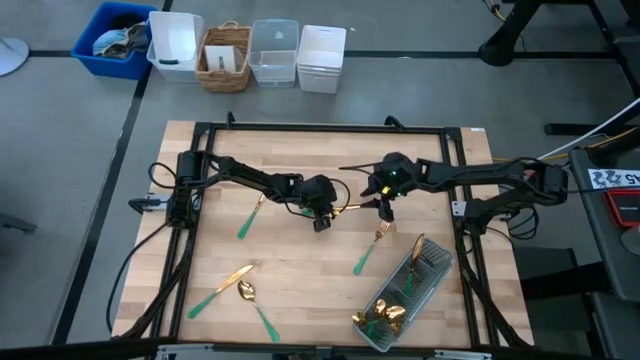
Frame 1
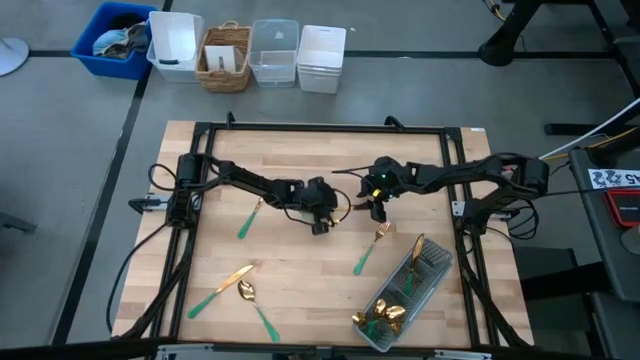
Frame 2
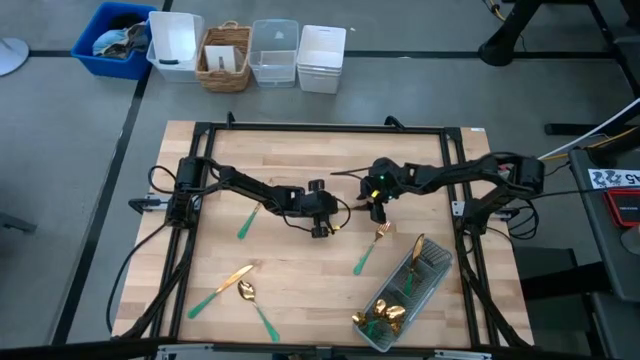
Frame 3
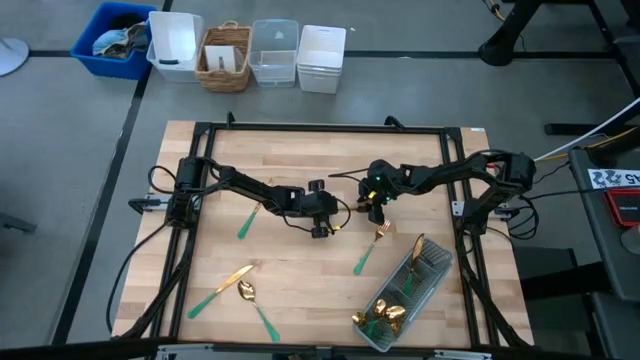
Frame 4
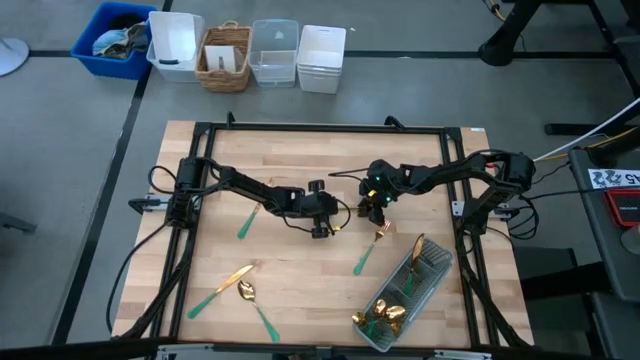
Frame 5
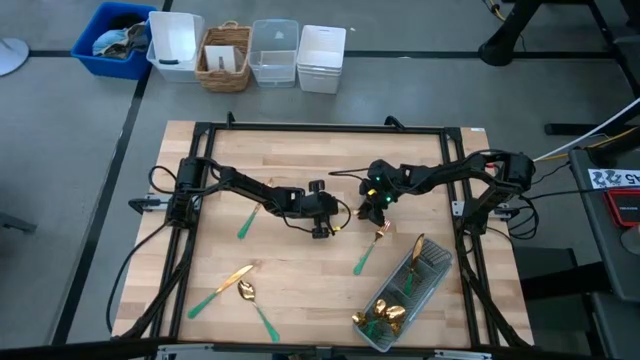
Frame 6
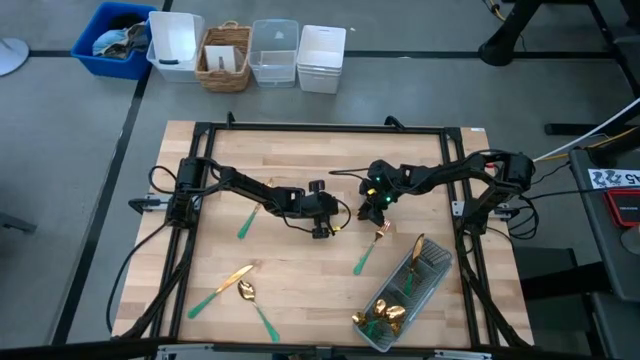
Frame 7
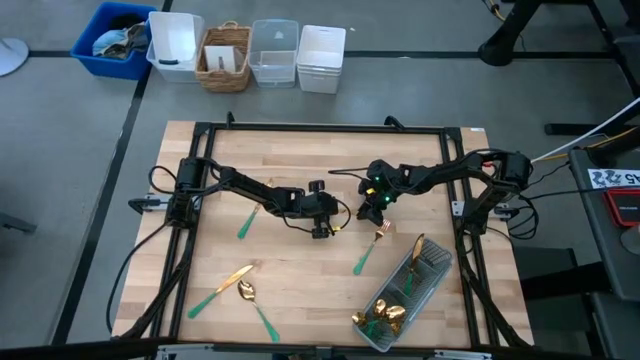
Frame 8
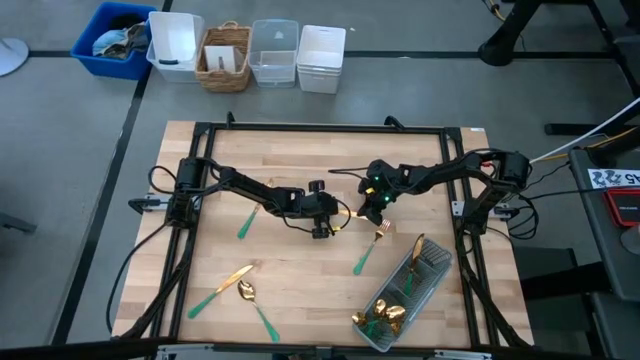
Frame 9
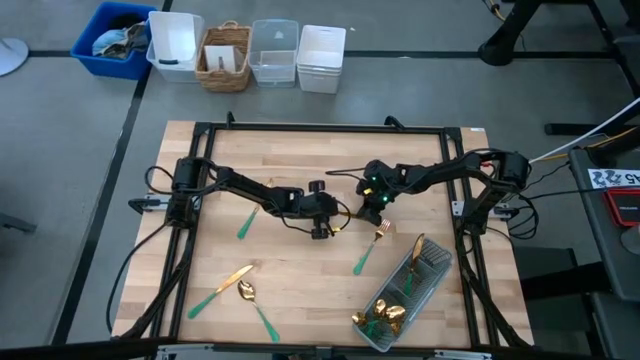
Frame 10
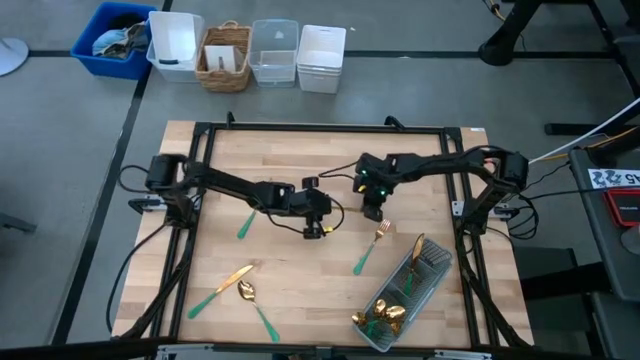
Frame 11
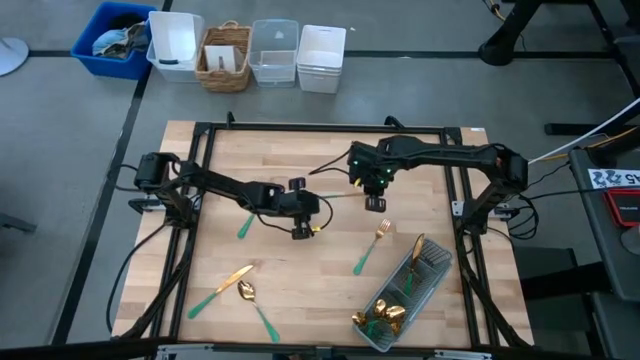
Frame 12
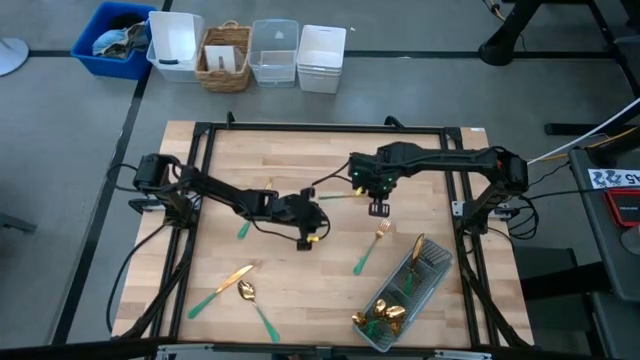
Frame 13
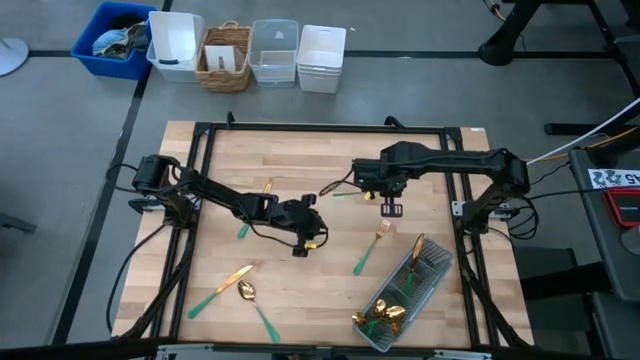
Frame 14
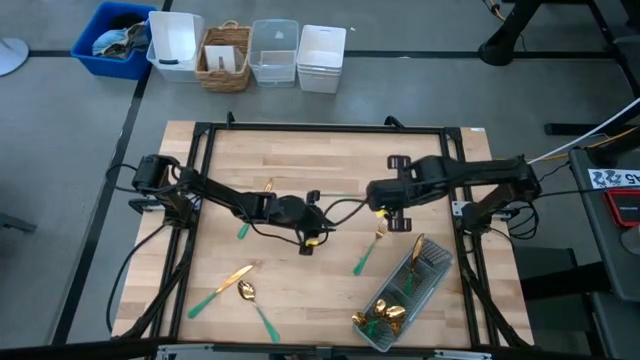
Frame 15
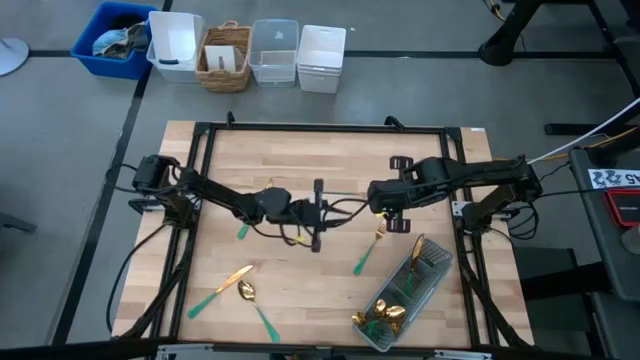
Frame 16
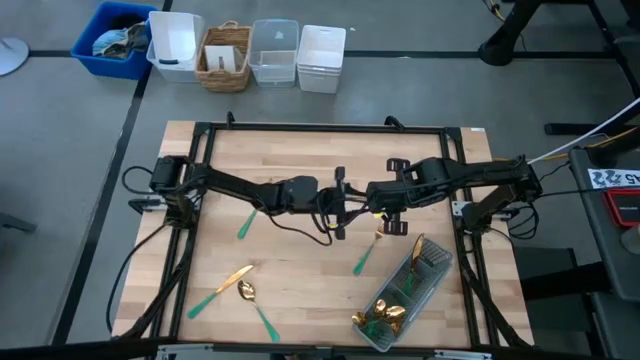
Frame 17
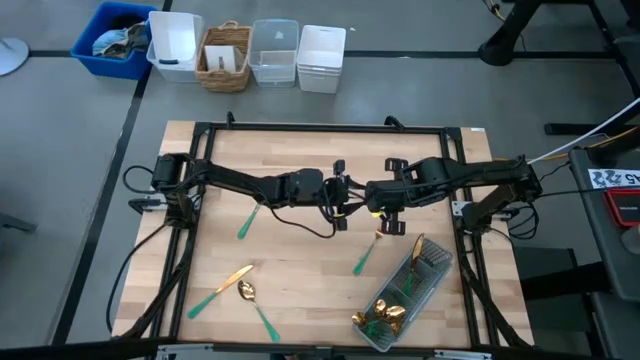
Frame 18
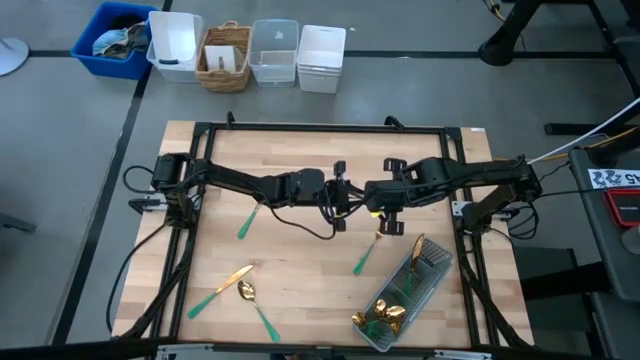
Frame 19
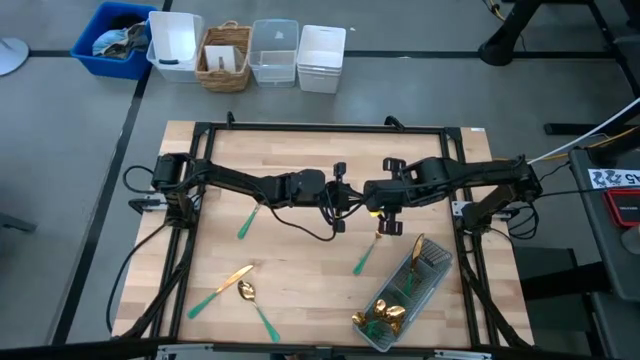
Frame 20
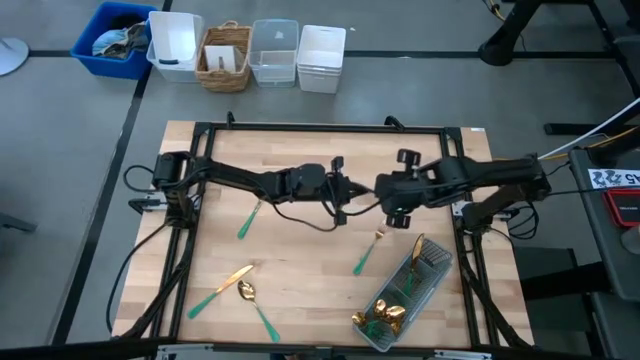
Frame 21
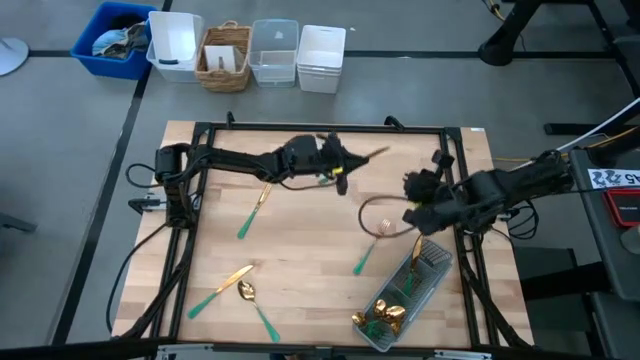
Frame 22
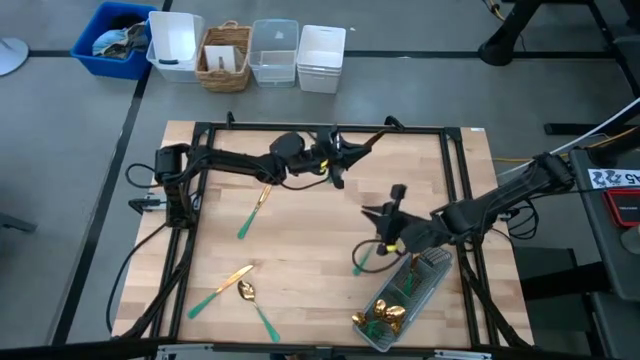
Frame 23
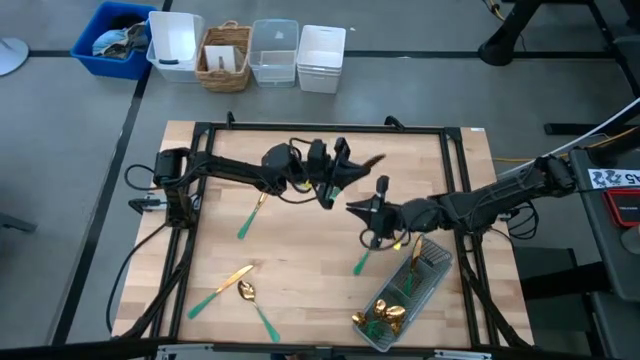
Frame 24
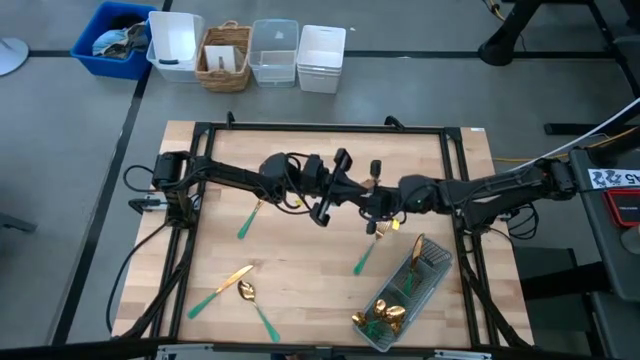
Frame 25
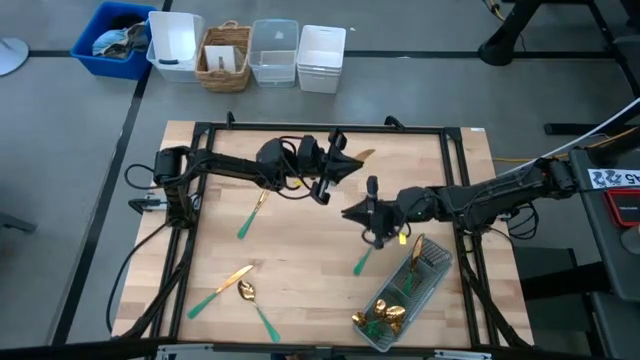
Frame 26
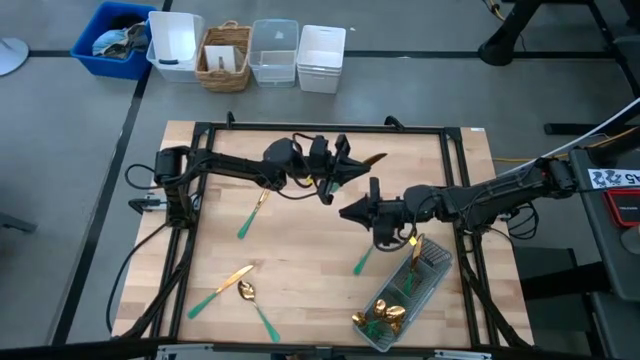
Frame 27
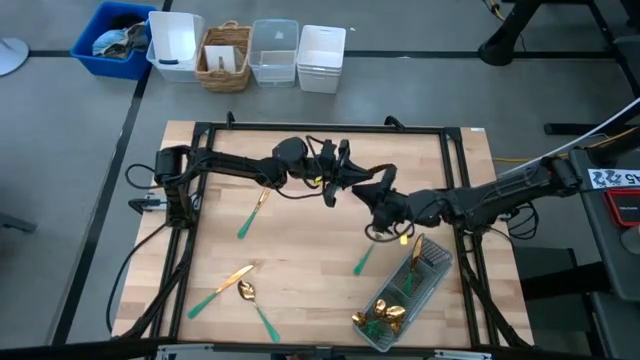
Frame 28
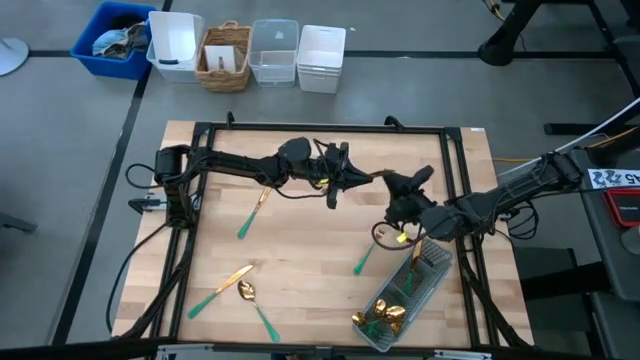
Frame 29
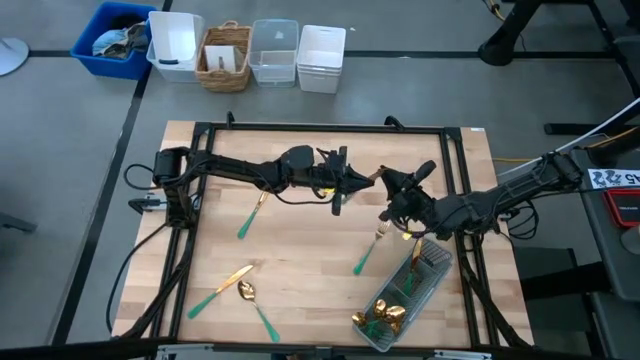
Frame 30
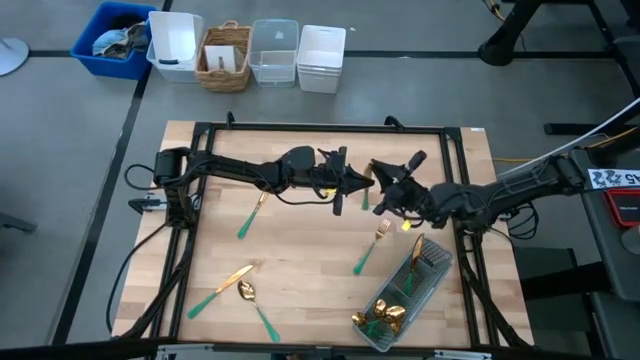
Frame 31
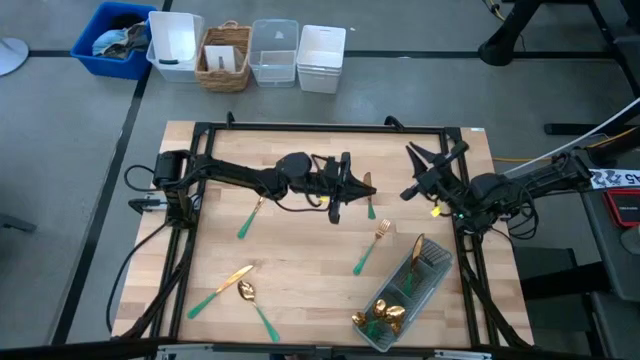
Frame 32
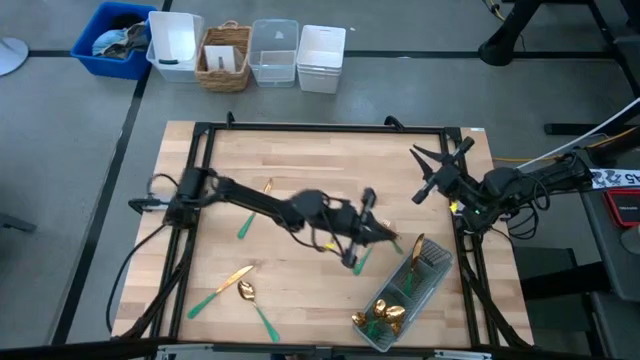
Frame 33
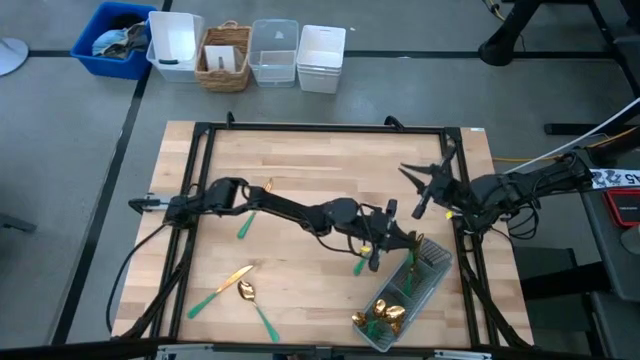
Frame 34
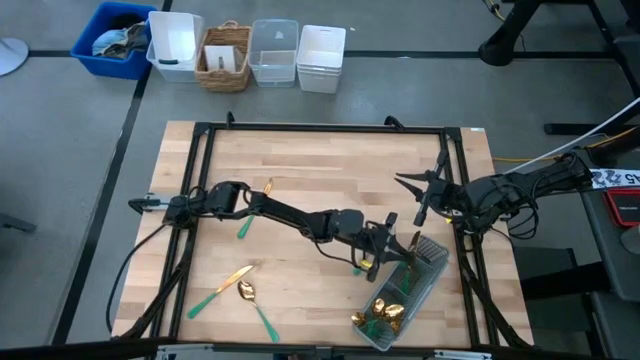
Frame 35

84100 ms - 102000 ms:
Task: Sort silverware
Put the top right table knife into the utensil organizer

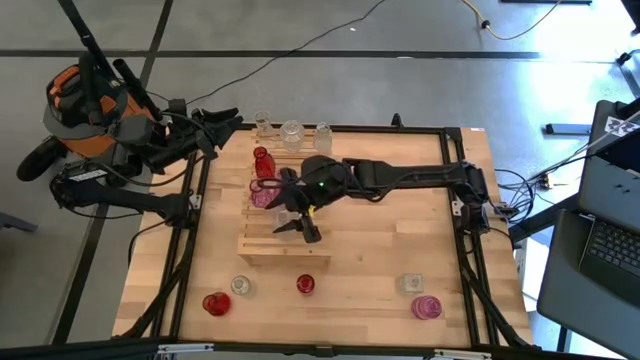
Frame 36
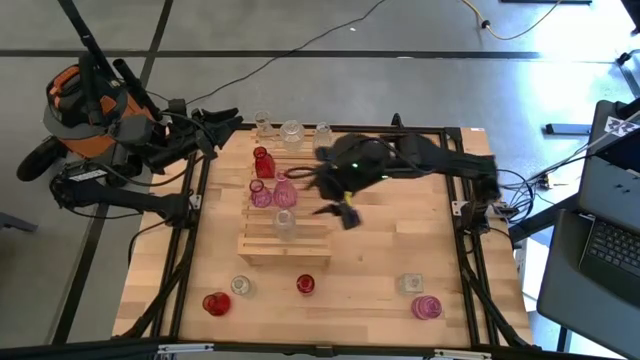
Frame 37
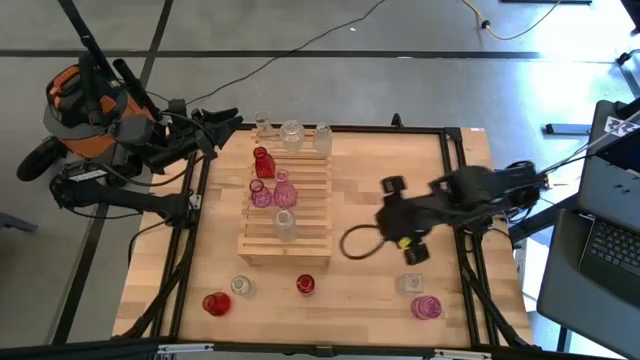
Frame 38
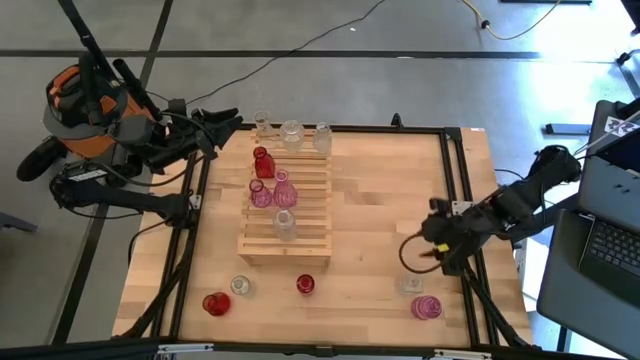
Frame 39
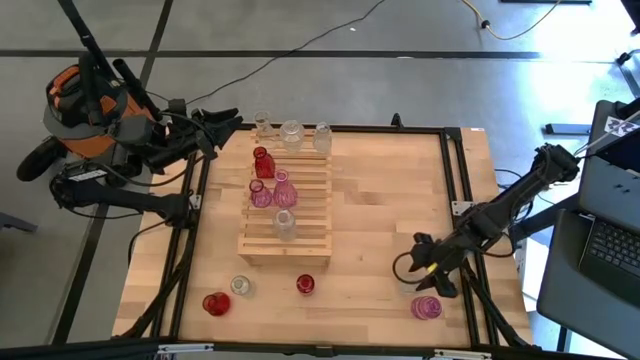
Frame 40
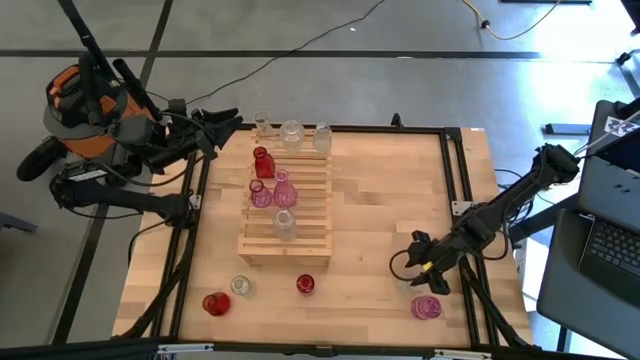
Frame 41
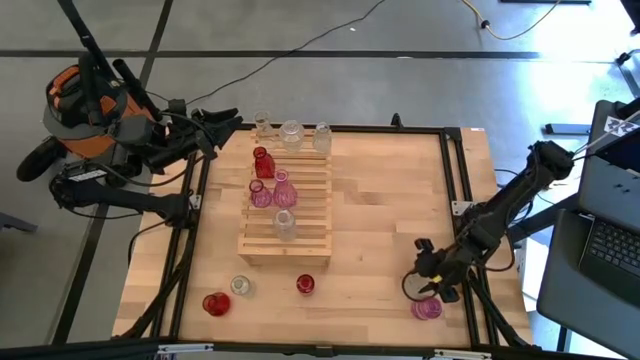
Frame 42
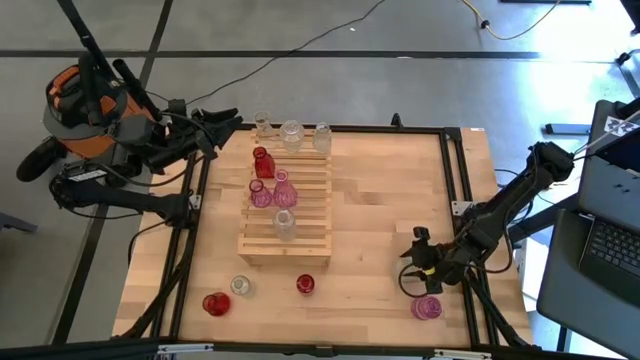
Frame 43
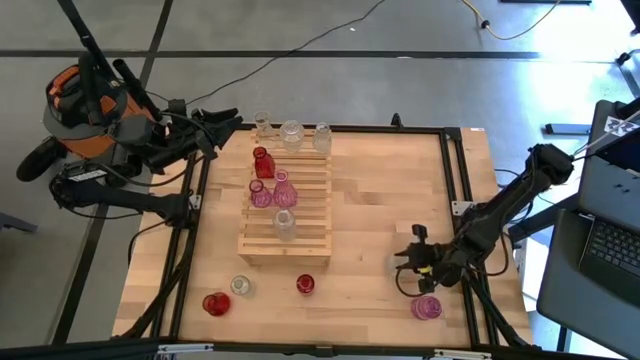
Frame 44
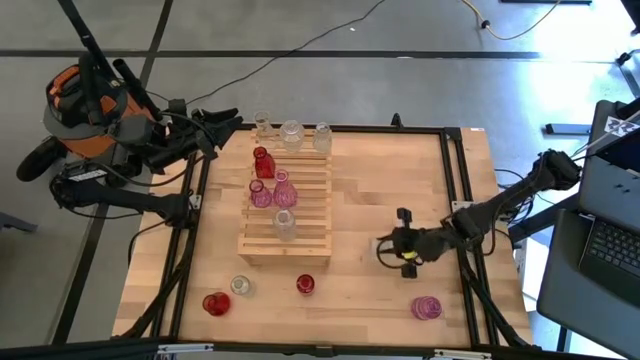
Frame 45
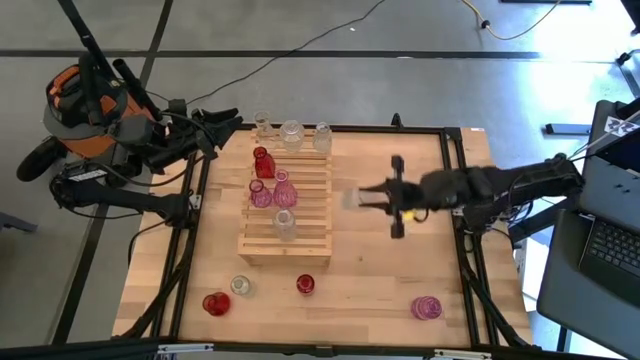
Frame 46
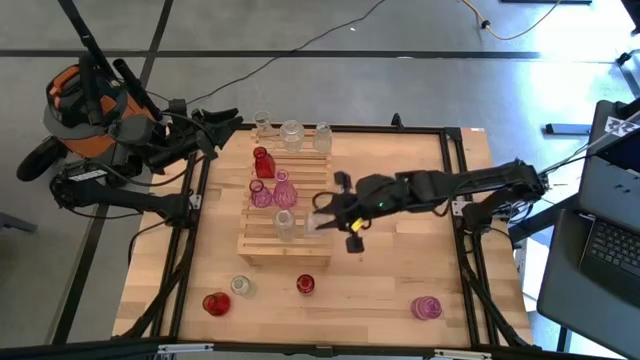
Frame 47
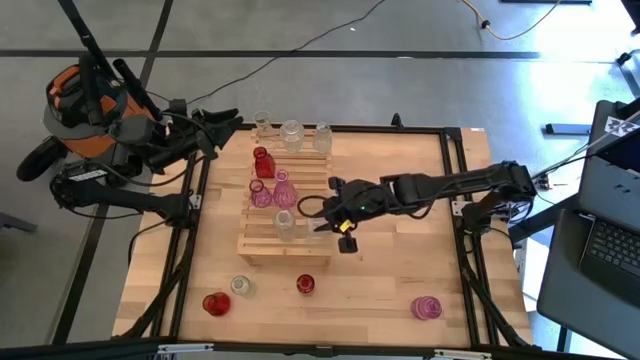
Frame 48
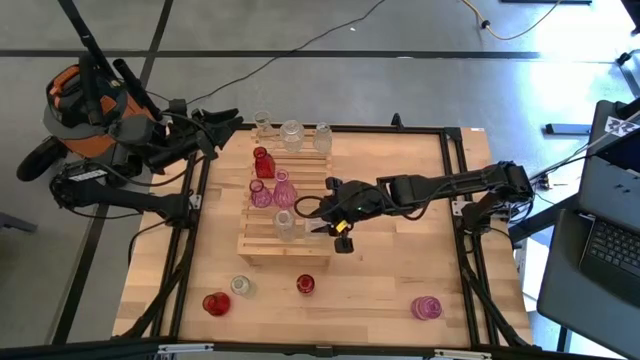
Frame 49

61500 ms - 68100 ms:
Task: sort vases onto shelf
Put the transparent vase on the shelf aligned with the other transparent vase
